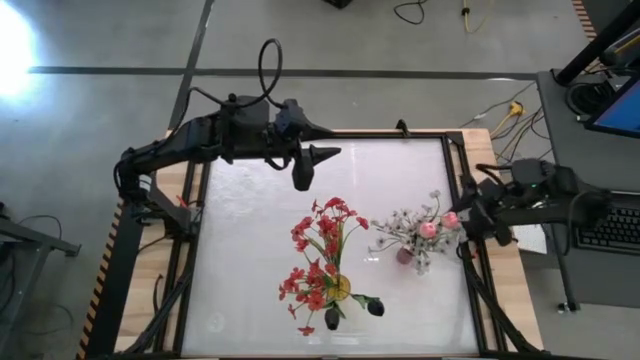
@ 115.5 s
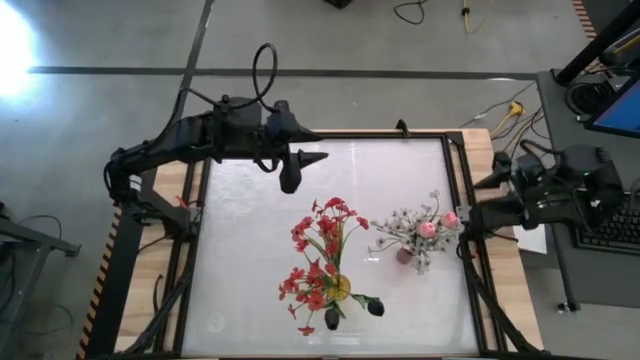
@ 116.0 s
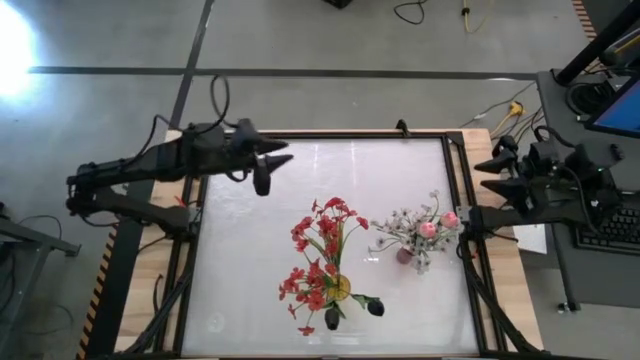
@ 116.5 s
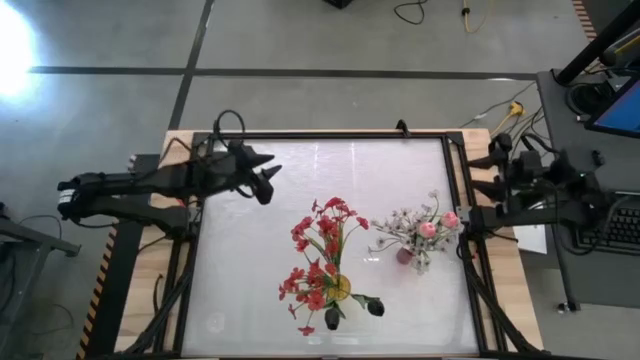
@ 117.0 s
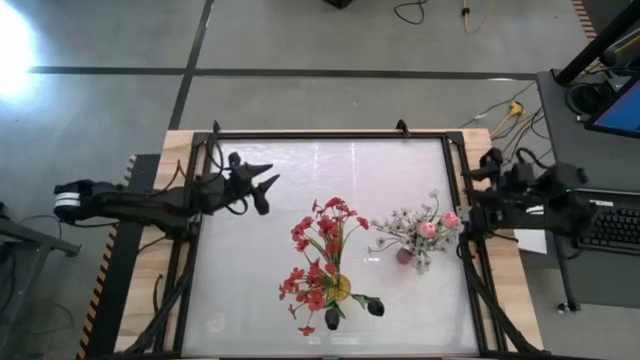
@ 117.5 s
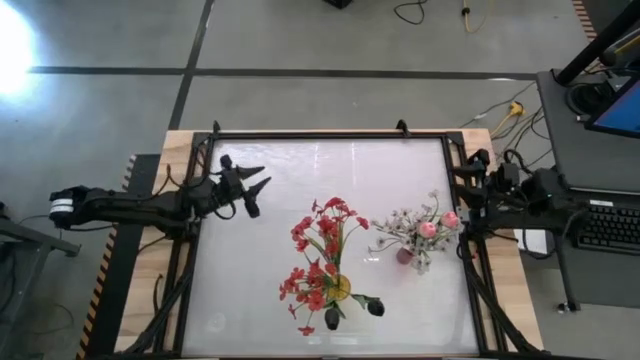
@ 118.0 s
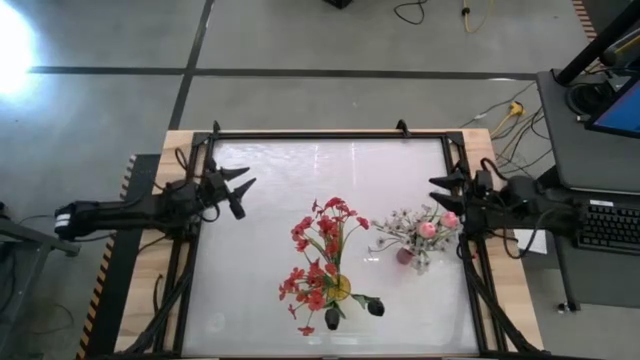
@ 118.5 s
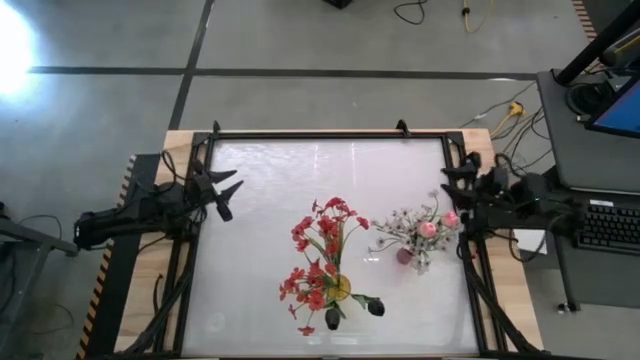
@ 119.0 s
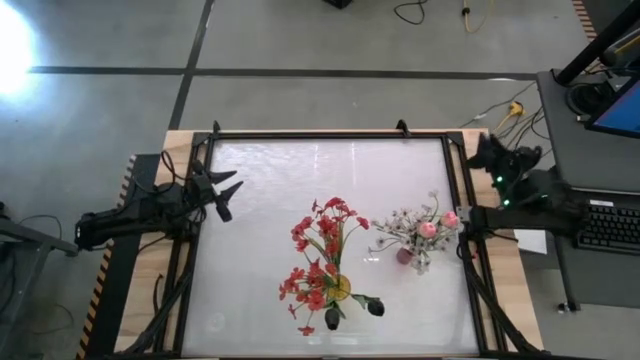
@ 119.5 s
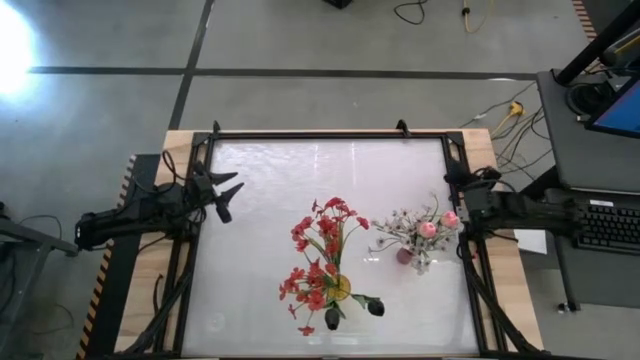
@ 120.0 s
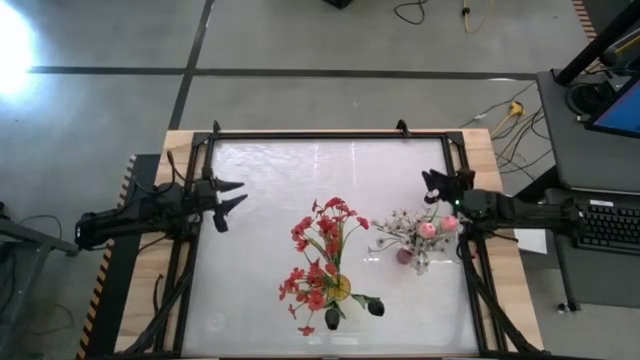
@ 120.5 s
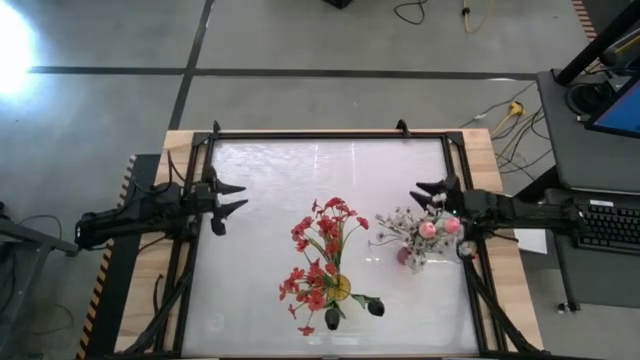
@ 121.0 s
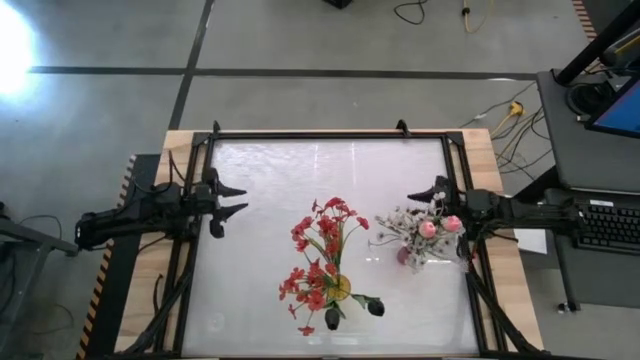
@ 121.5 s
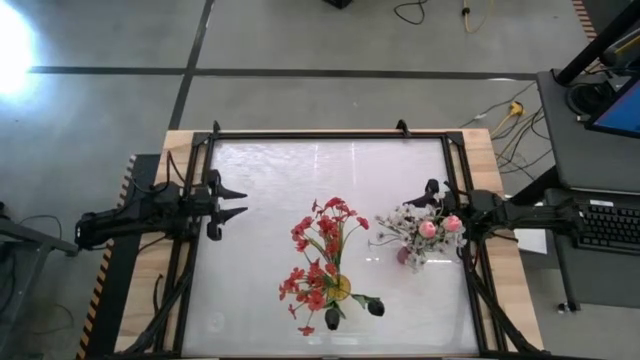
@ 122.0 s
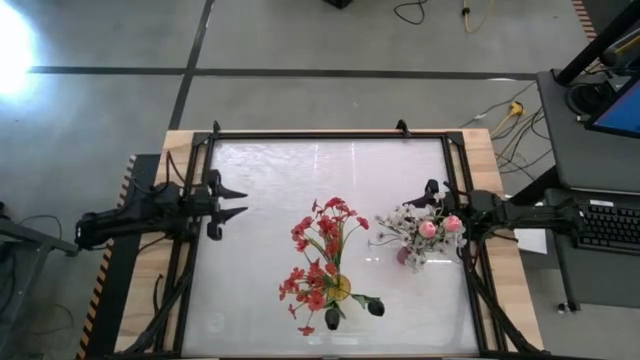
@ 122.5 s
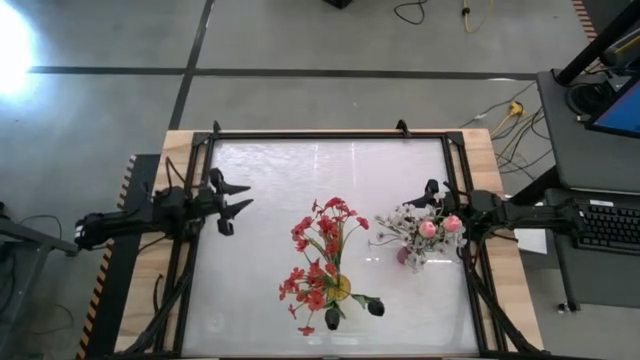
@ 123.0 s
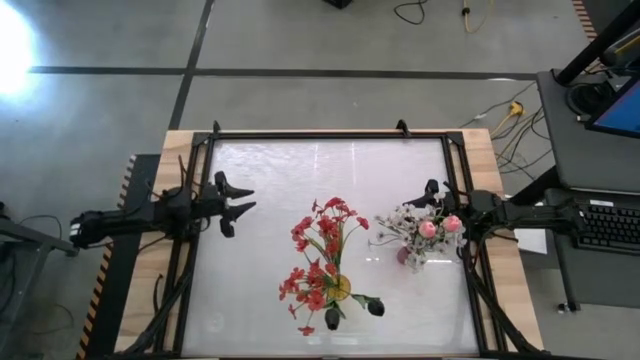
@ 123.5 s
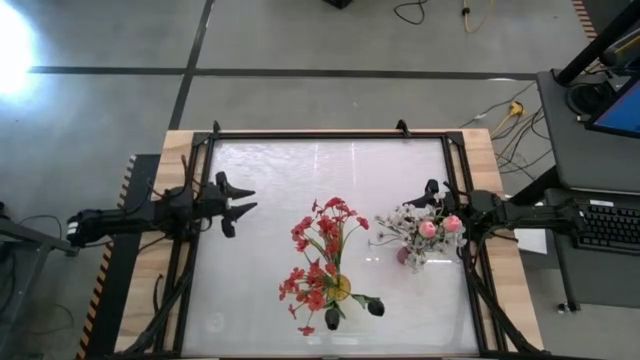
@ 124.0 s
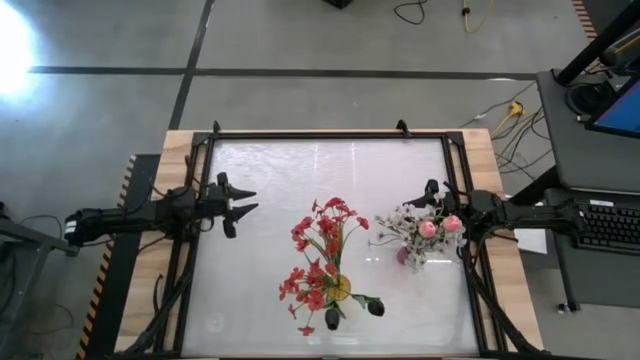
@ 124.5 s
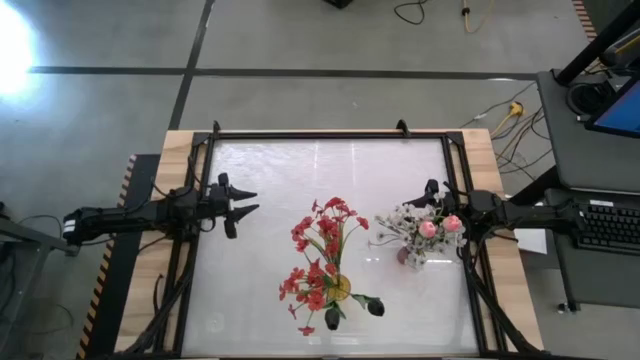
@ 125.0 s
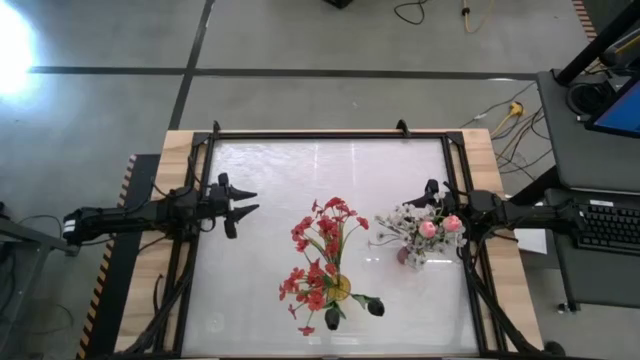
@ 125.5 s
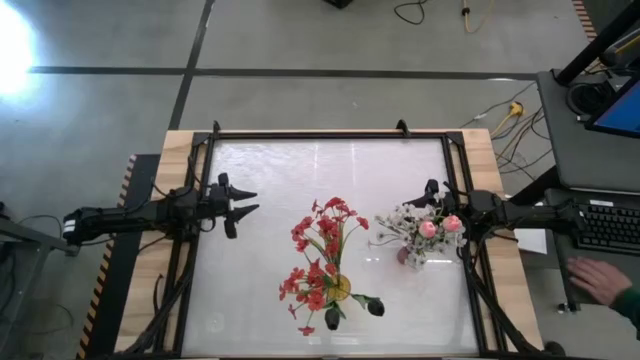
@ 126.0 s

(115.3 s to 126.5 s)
Task: Sort flowers into vase by color
Return to Home Position

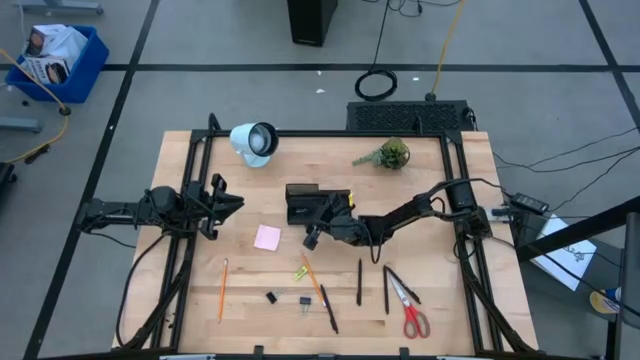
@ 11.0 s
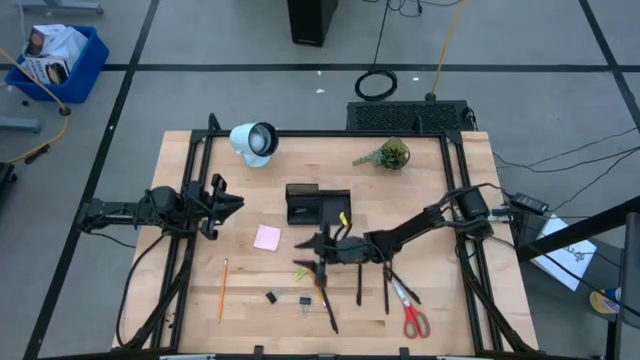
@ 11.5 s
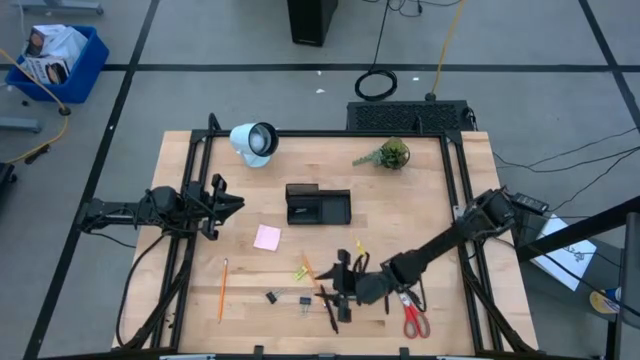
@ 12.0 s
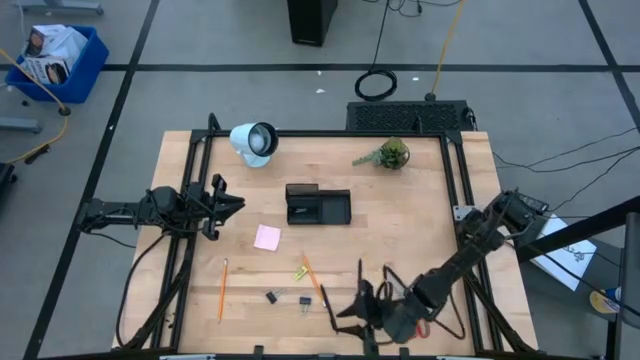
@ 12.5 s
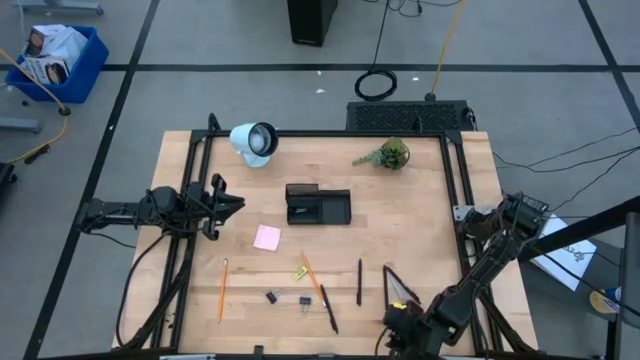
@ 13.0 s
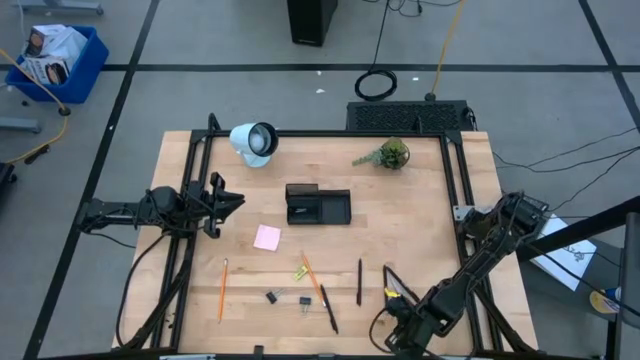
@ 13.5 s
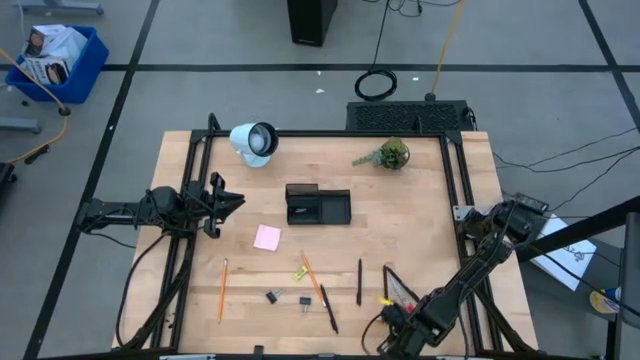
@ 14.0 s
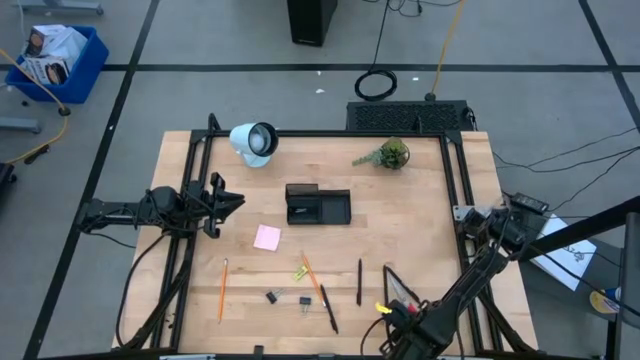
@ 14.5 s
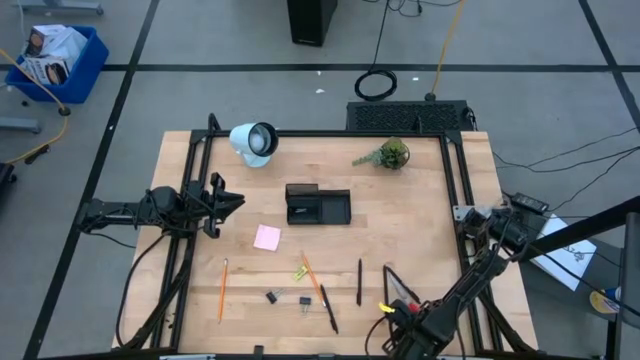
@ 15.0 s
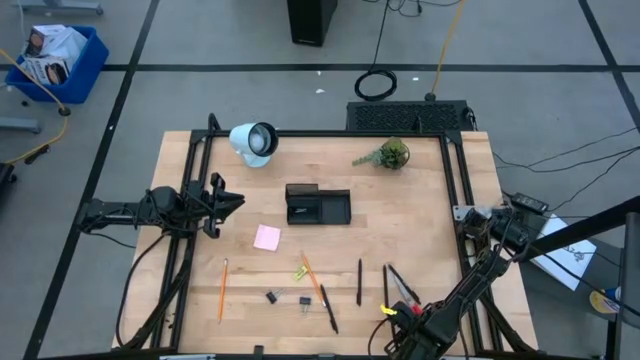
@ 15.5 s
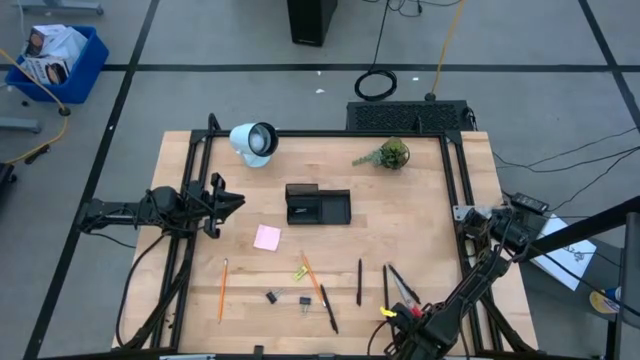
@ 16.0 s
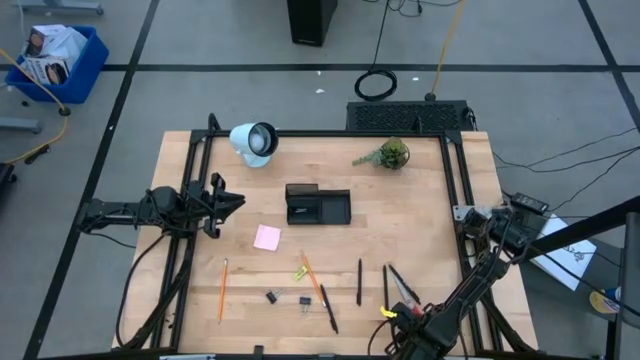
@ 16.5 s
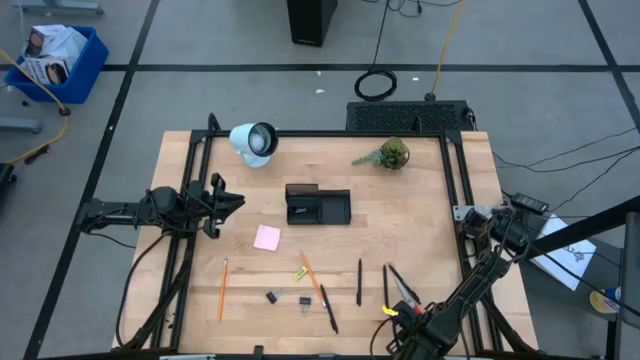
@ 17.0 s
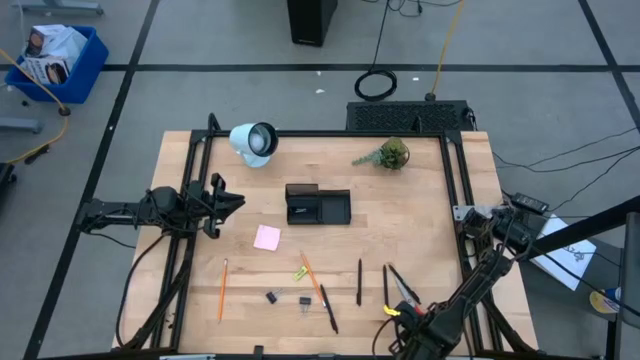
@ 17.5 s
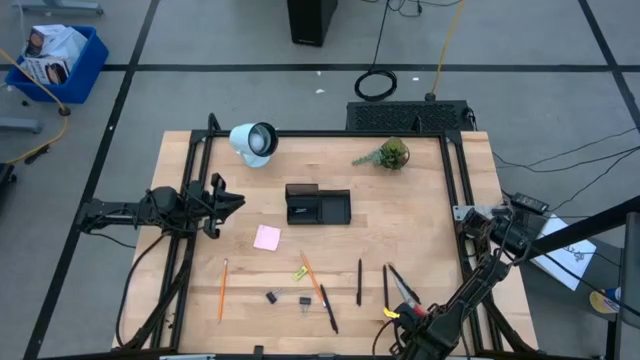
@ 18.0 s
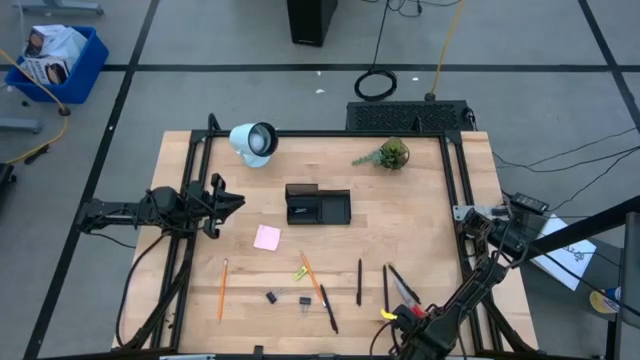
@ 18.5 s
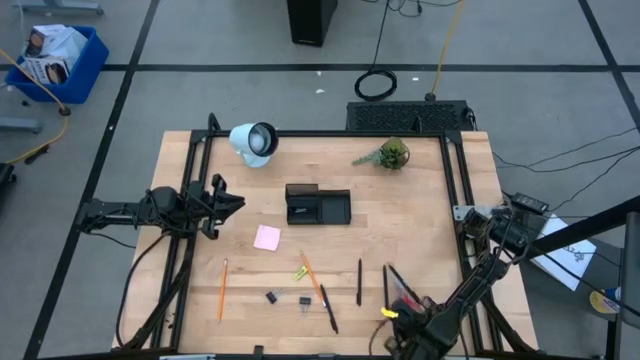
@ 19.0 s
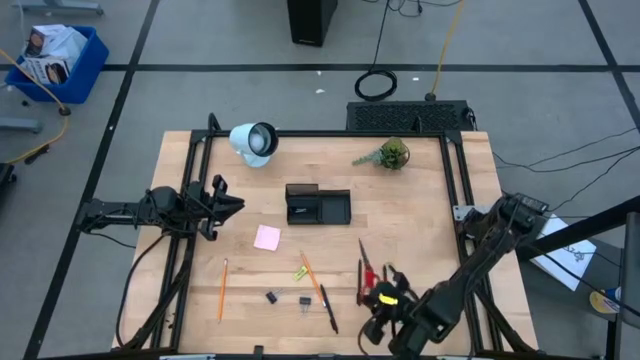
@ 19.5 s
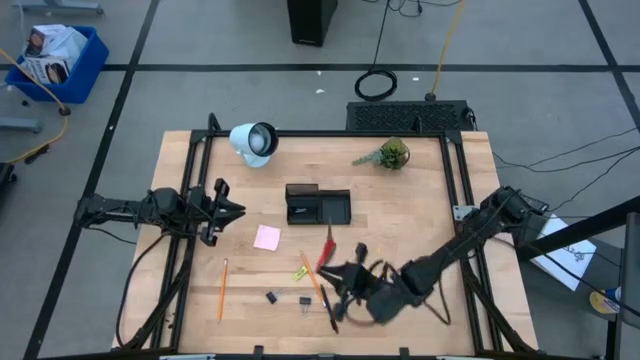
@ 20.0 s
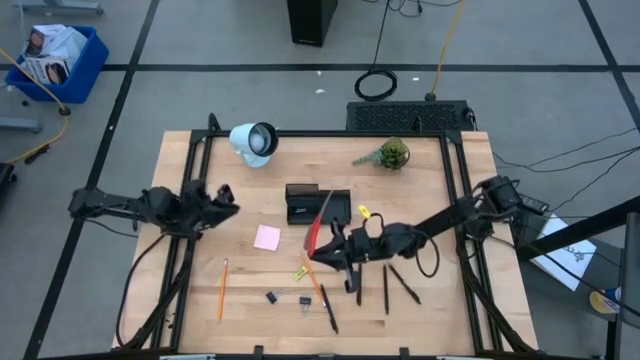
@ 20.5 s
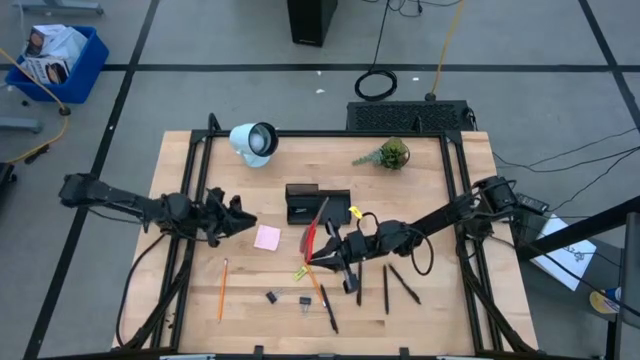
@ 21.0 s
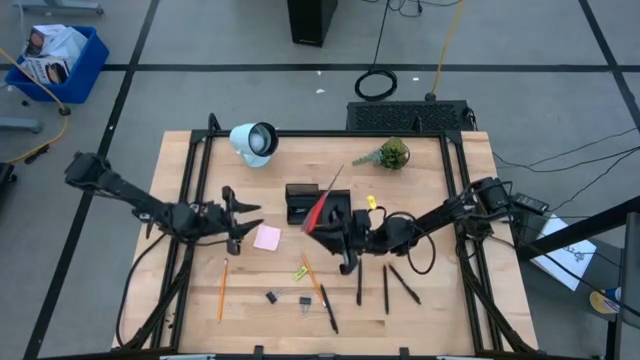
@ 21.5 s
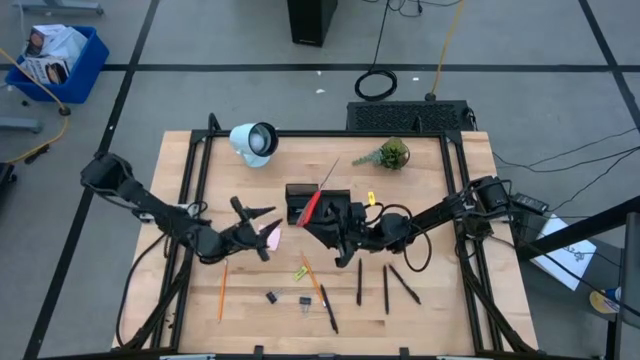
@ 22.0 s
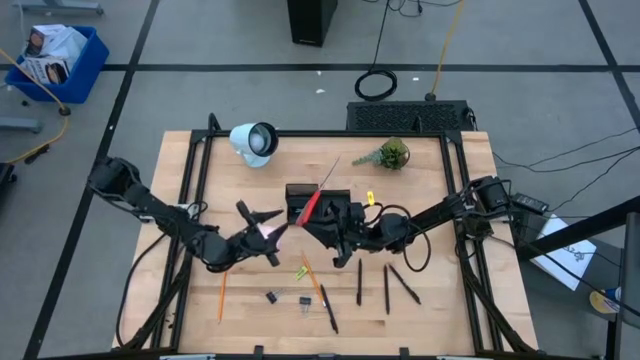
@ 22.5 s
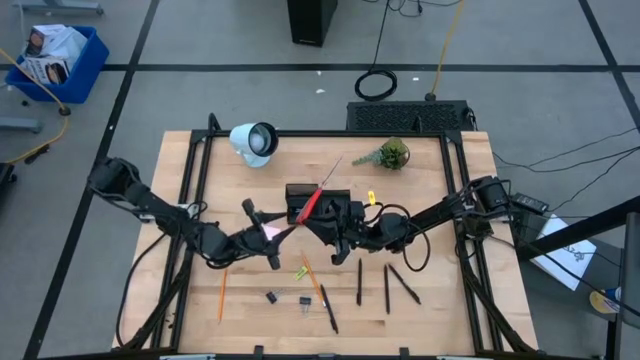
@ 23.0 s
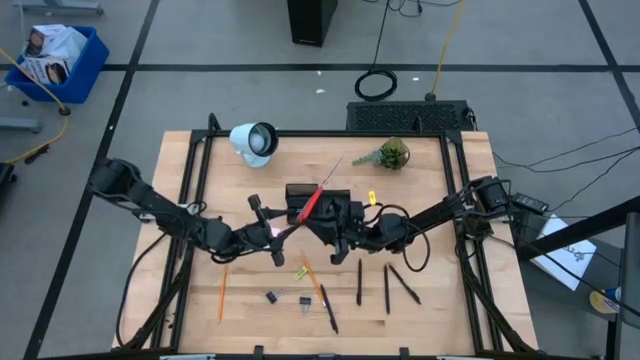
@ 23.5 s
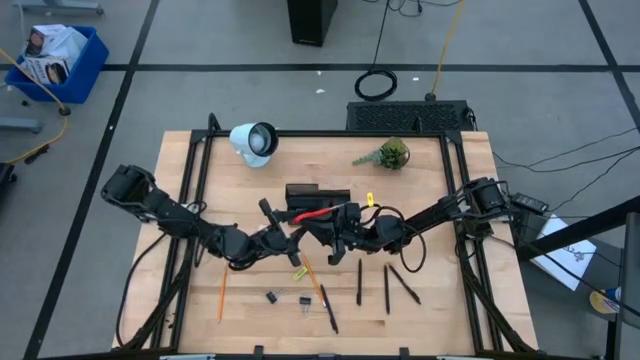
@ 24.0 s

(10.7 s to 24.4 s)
Task: Pick and place office supplies into organizer
Put the red scissors into the black desk organizer
